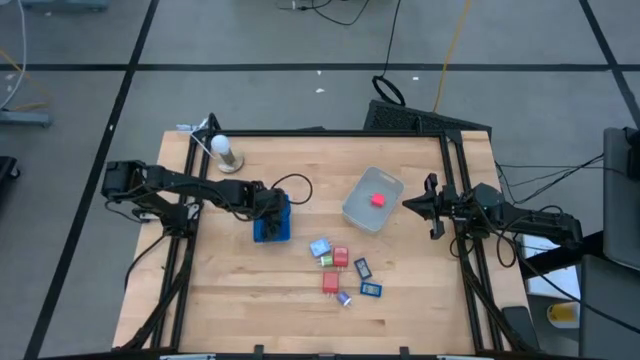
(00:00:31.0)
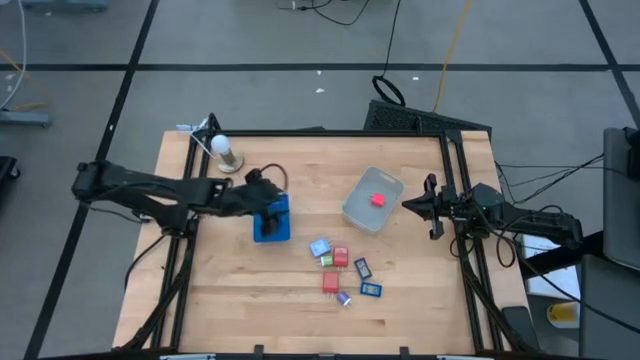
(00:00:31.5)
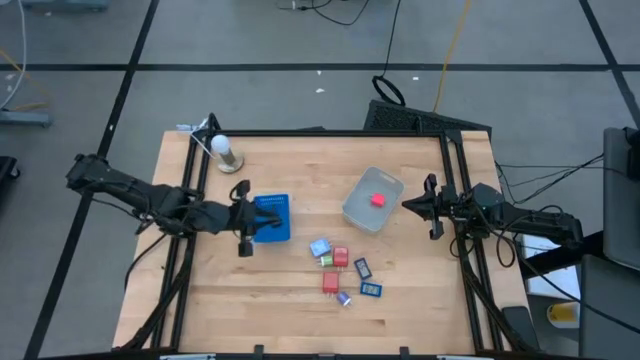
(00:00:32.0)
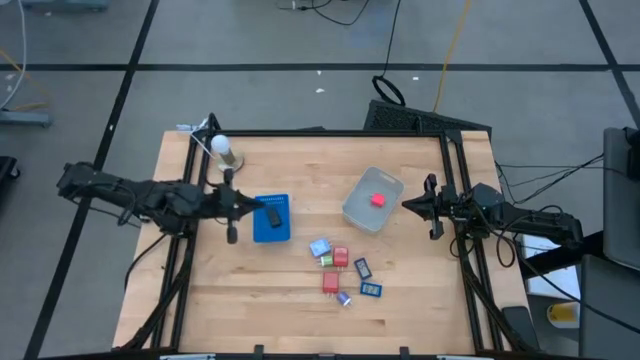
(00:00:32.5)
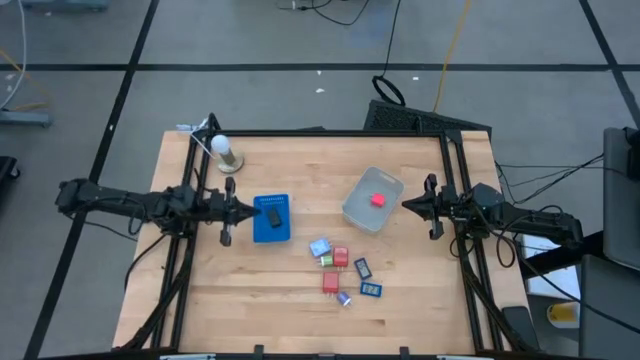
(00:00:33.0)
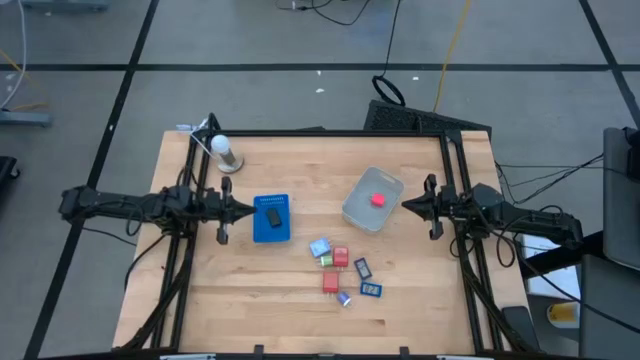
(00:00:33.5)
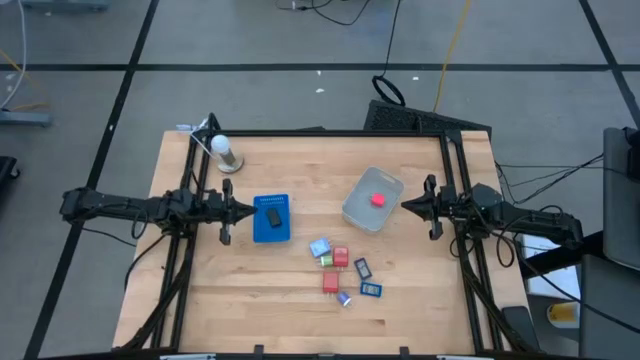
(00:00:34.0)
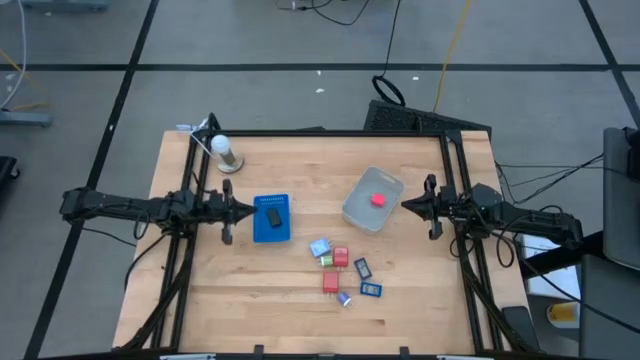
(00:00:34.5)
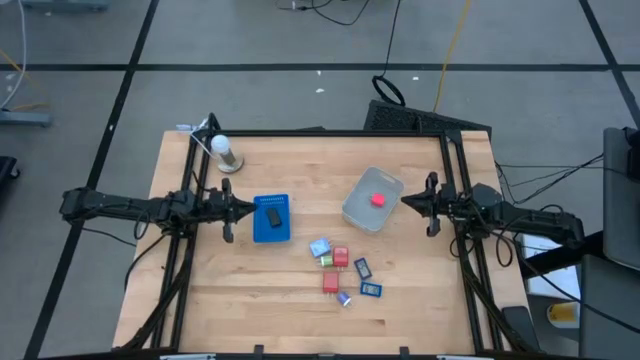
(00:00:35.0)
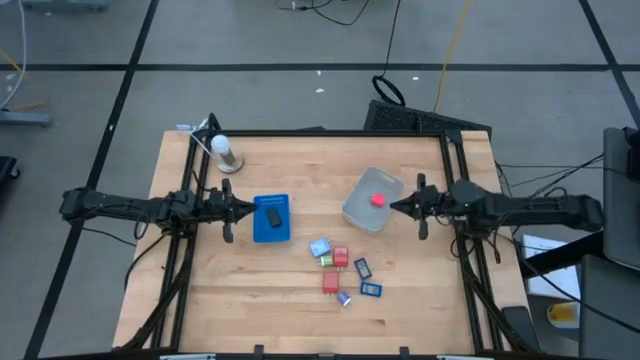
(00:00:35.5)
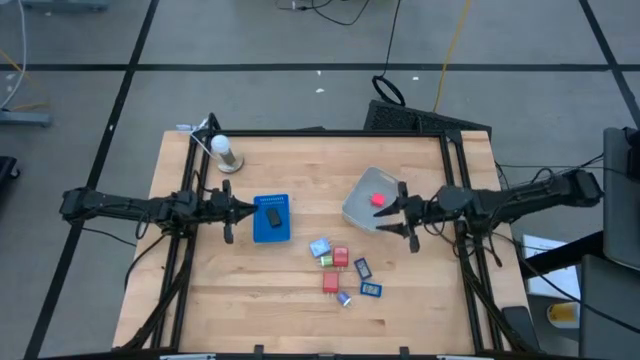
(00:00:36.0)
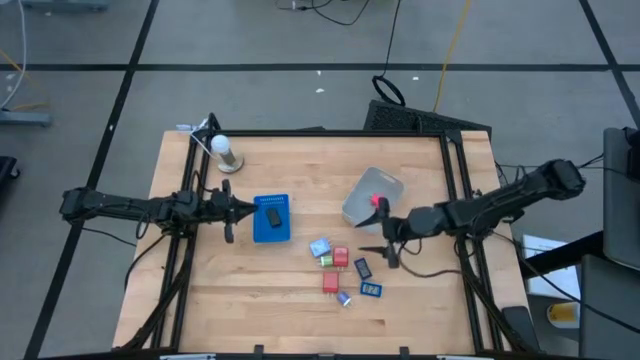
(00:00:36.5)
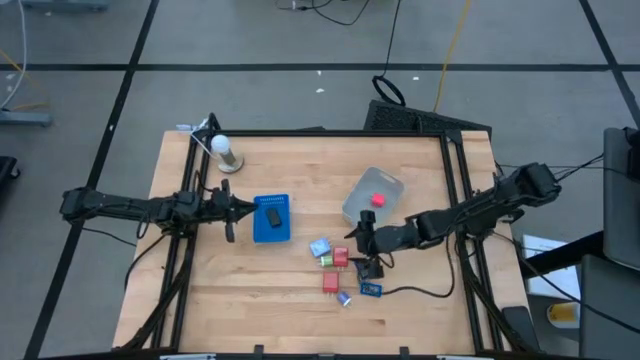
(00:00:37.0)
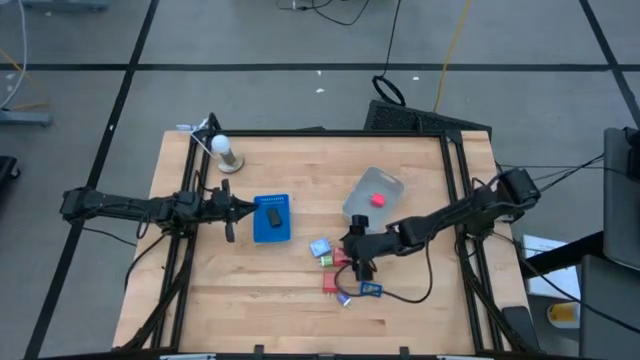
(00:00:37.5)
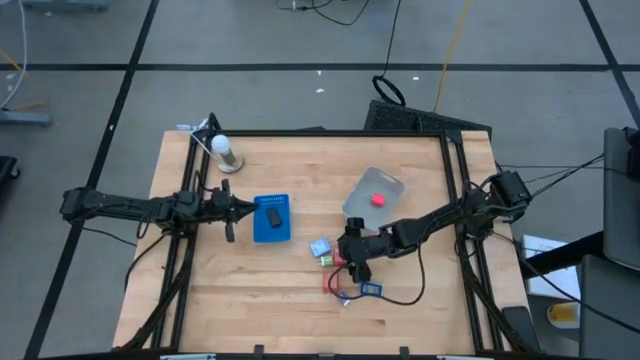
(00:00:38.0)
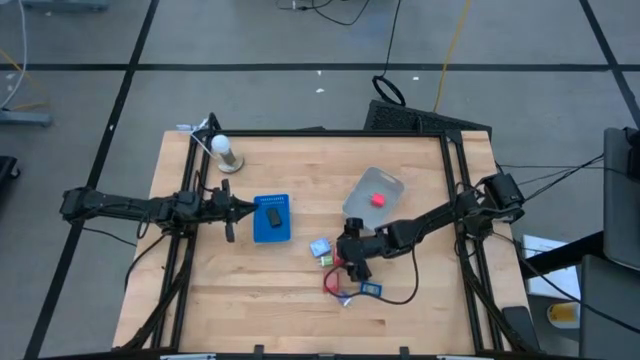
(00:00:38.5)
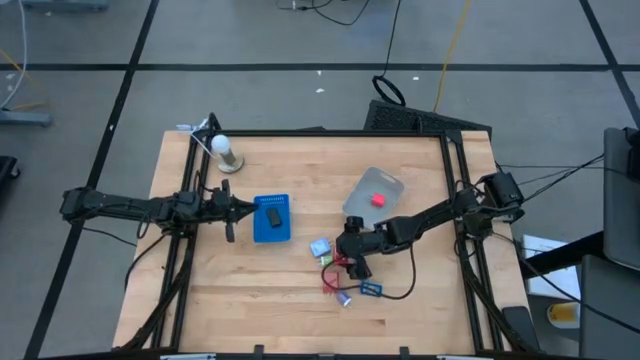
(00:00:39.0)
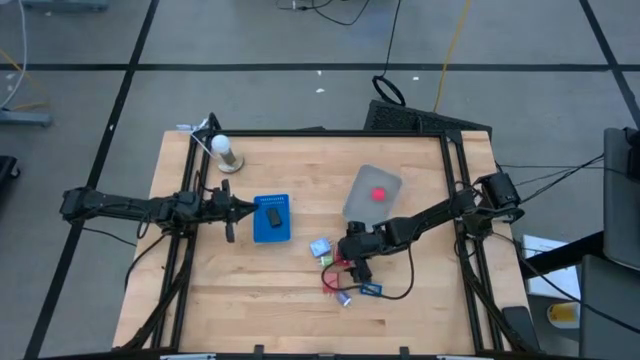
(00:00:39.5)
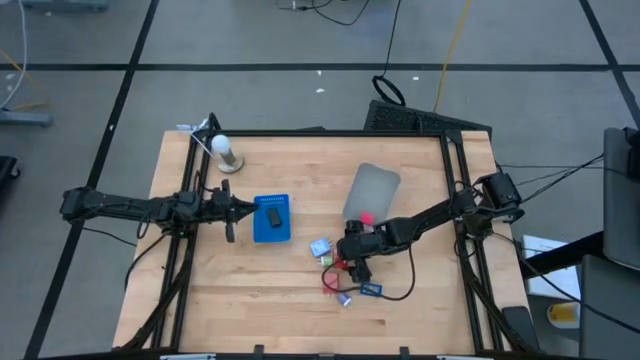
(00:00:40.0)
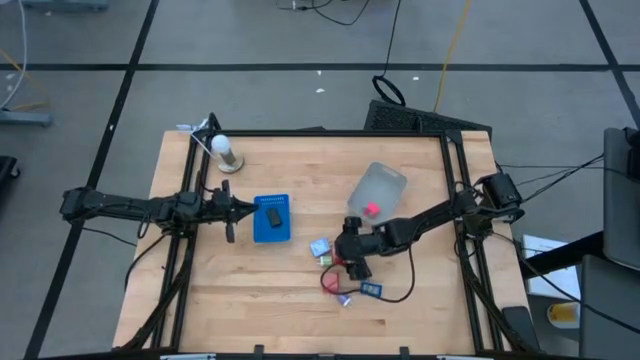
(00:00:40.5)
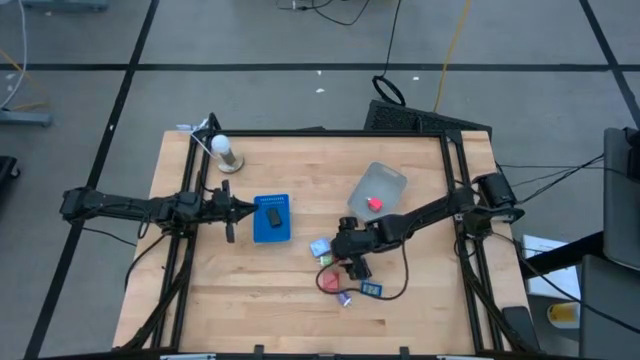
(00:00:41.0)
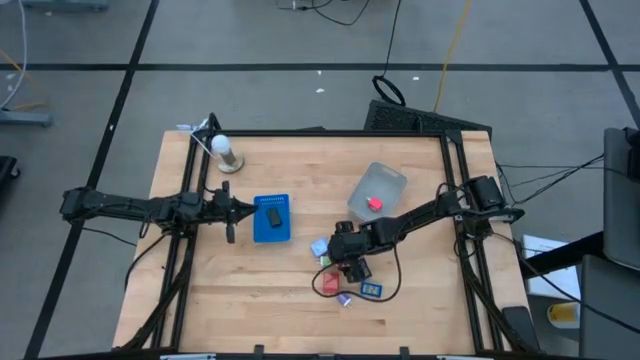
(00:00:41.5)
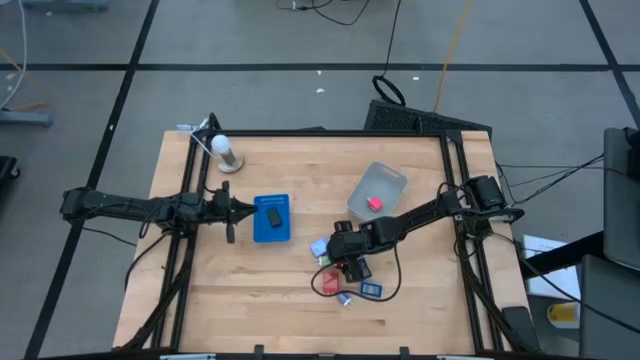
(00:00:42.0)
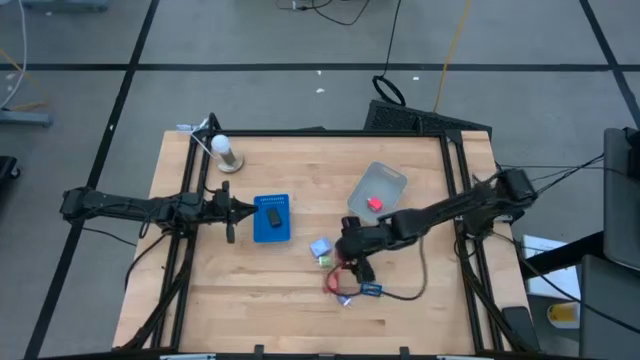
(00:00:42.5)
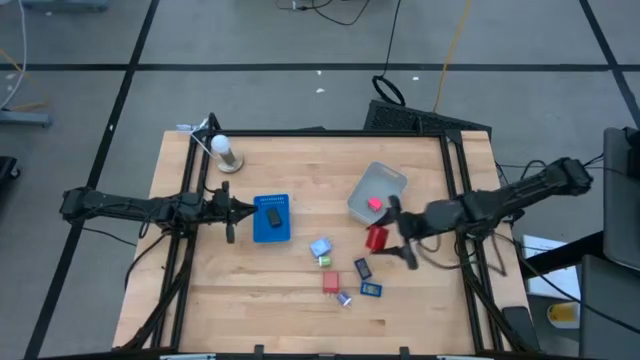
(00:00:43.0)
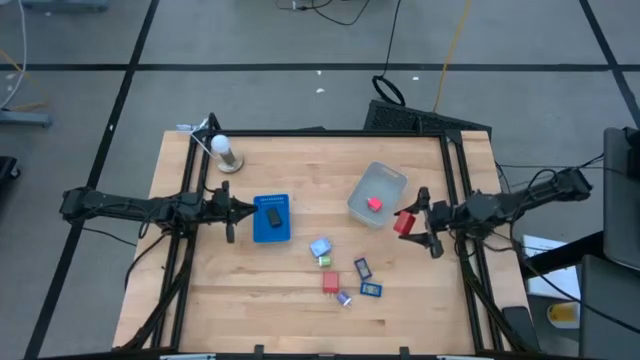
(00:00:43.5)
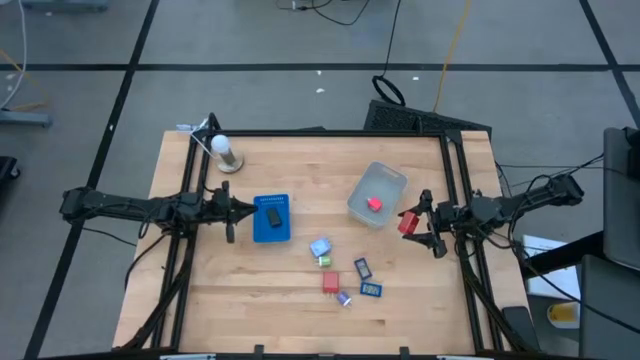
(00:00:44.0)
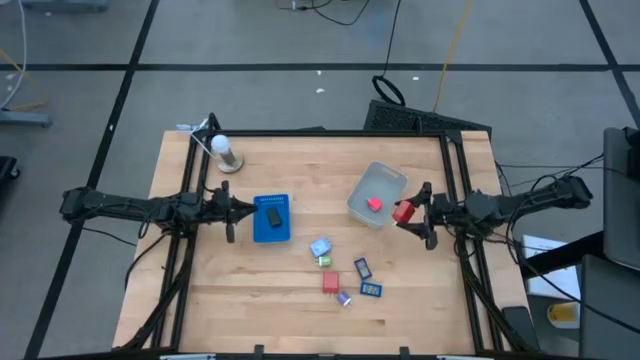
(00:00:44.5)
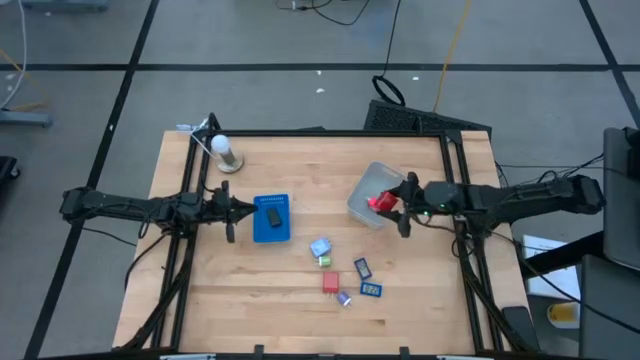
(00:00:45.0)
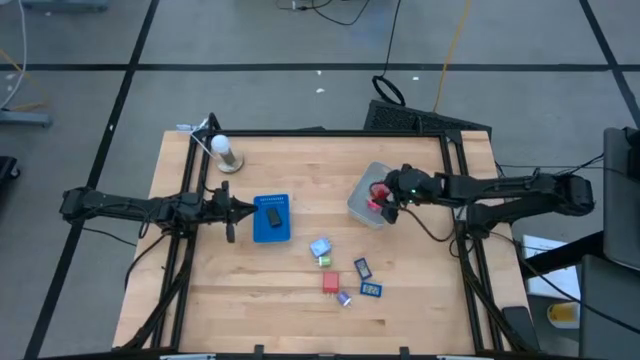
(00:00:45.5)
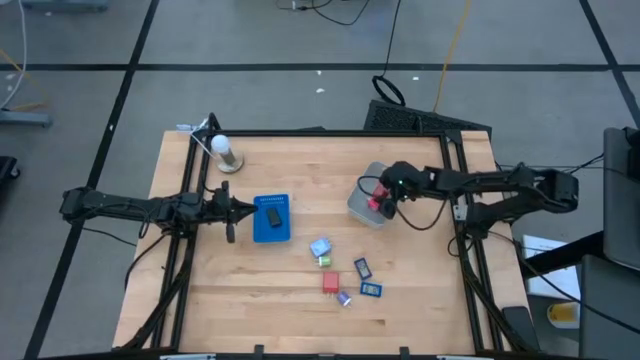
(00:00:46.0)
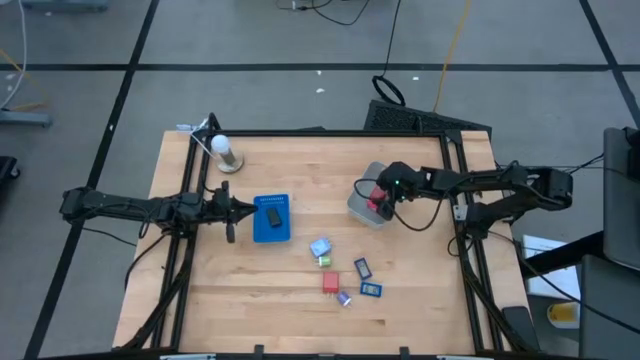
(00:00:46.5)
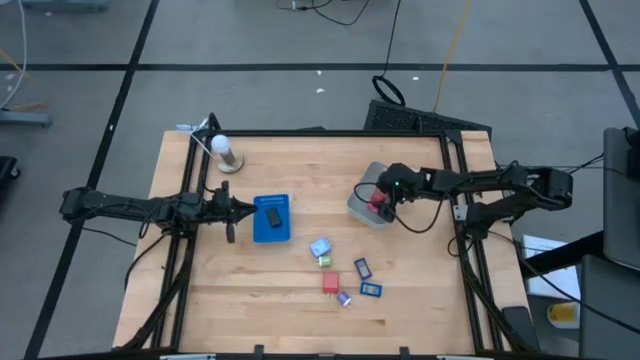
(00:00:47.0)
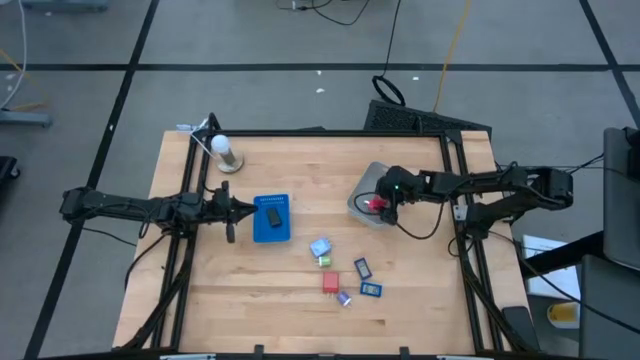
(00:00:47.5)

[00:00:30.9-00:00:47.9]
Task: Pick & Place Office items
Put the red charger adapter into the gray bin

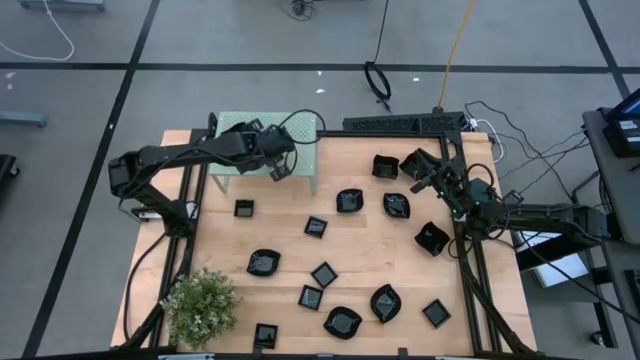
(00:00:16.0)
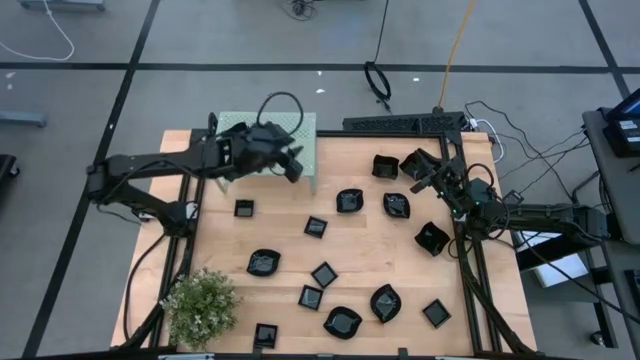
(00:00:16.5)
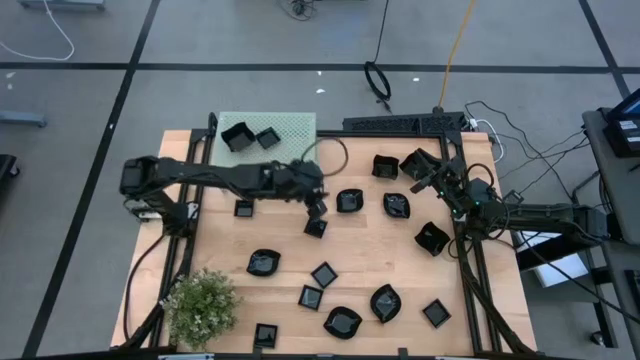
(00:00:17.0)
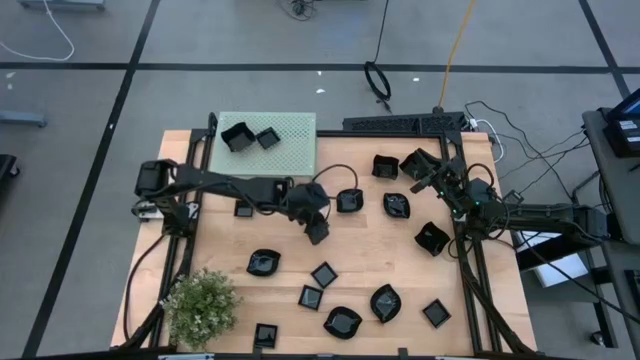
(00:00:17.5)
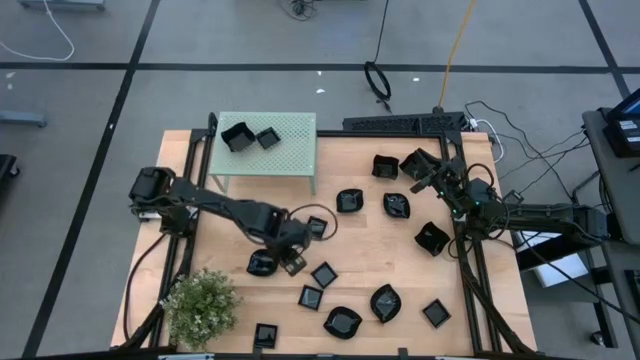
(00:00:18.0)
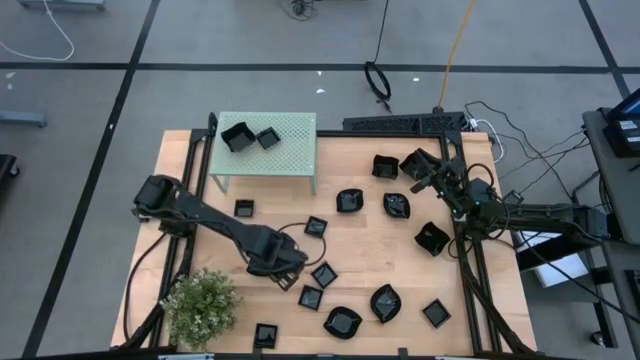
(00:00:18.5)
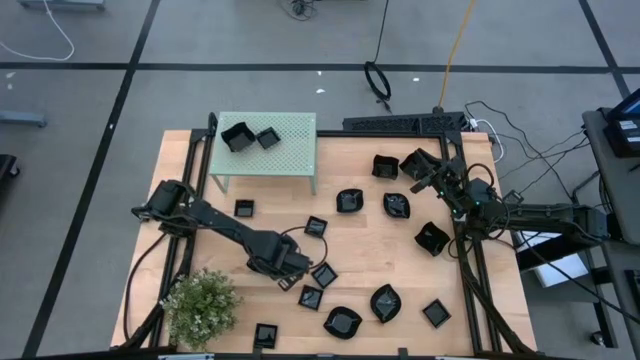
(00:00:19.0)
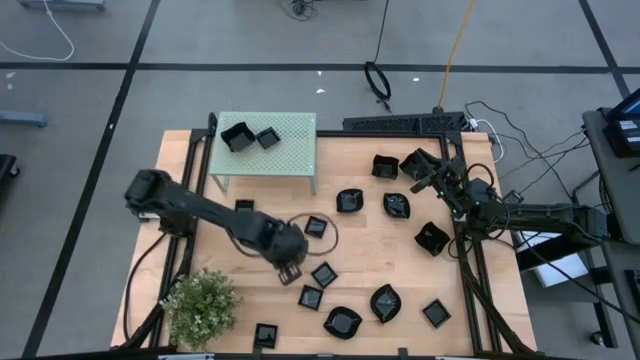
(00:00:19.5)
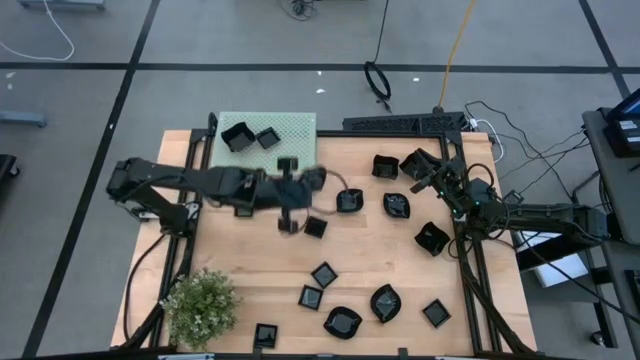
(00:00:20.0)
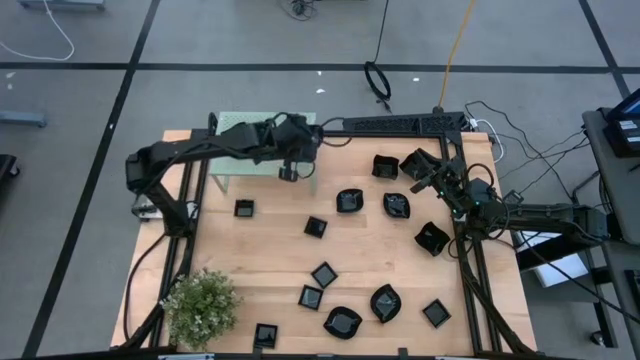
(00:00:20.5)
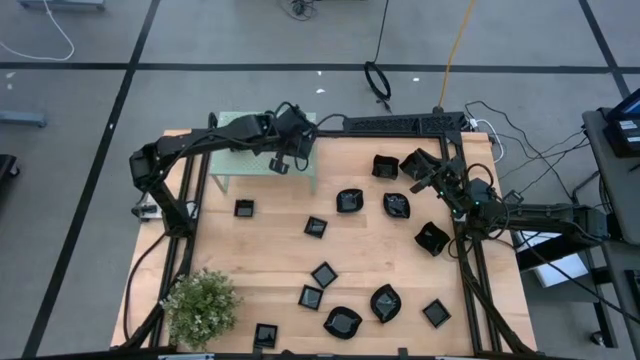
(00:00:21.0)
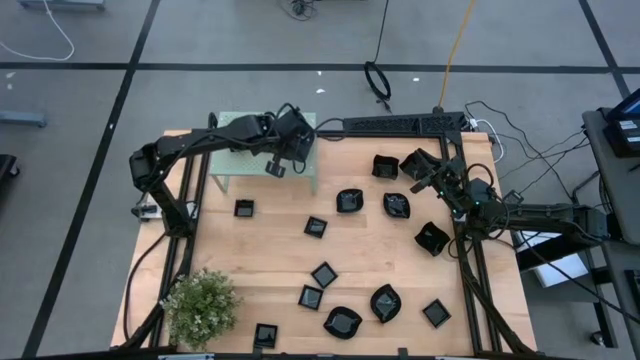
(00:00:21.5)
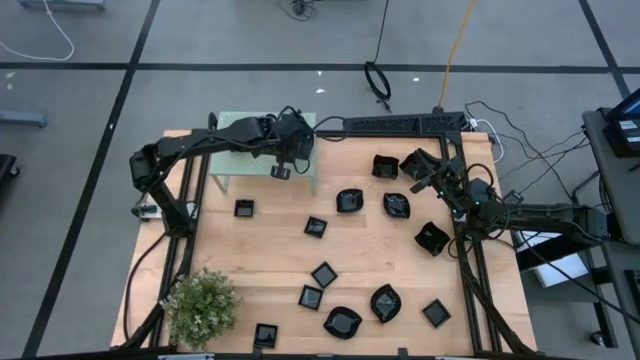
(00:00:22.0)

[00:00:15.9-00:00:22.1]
Task: Pick & Place Mini shaped plates
Put the leaf shaped plate on the shelf
